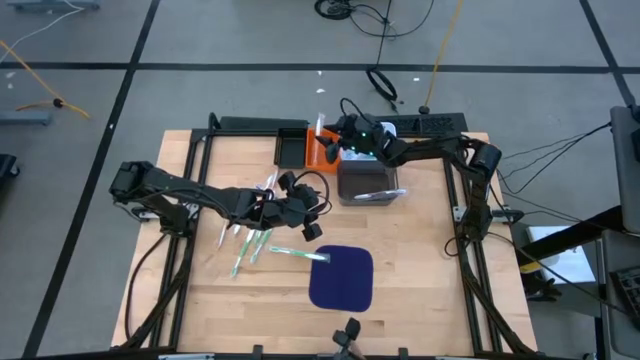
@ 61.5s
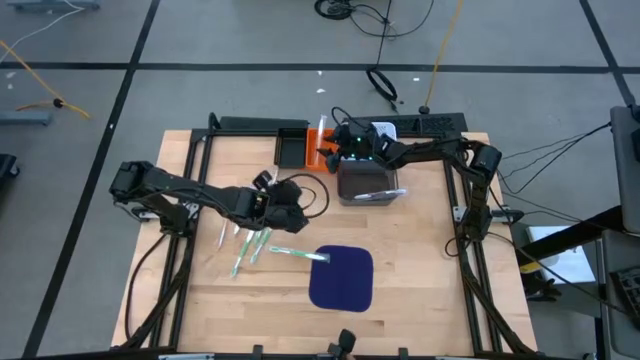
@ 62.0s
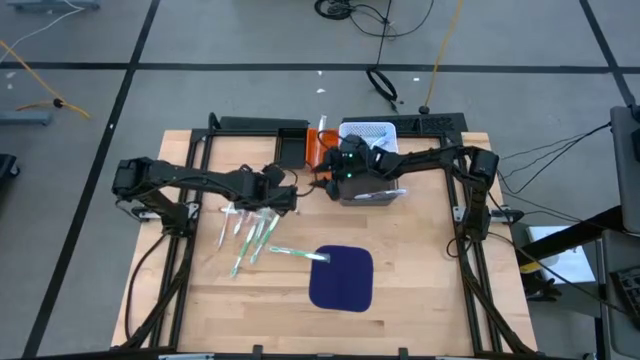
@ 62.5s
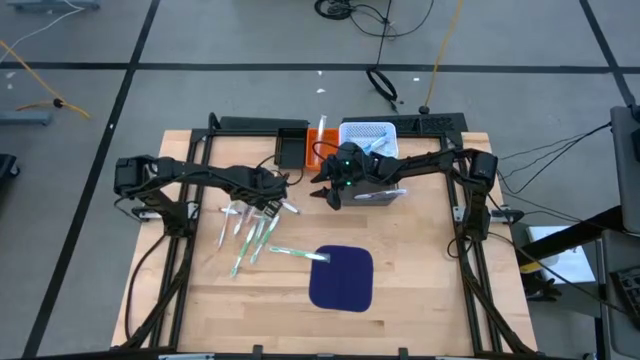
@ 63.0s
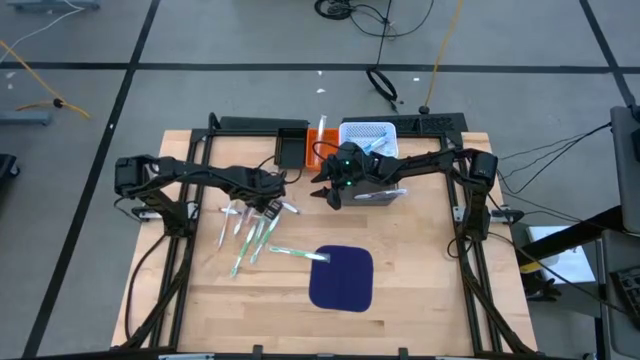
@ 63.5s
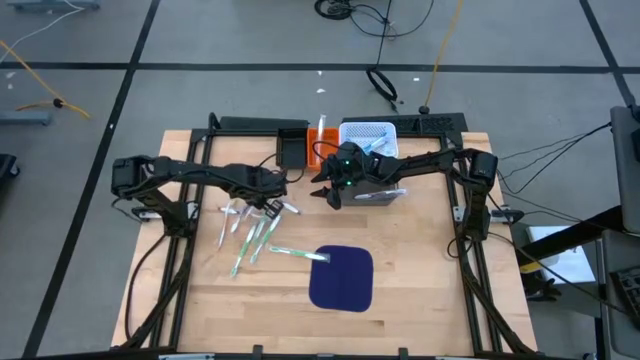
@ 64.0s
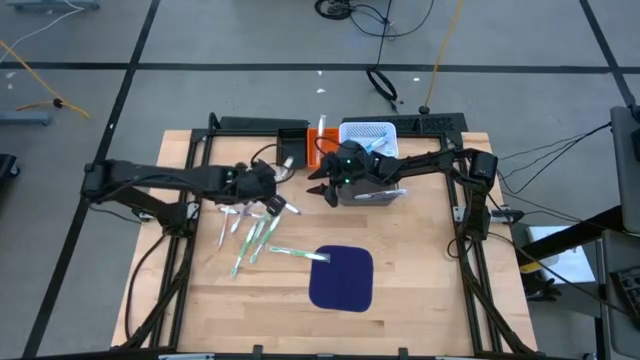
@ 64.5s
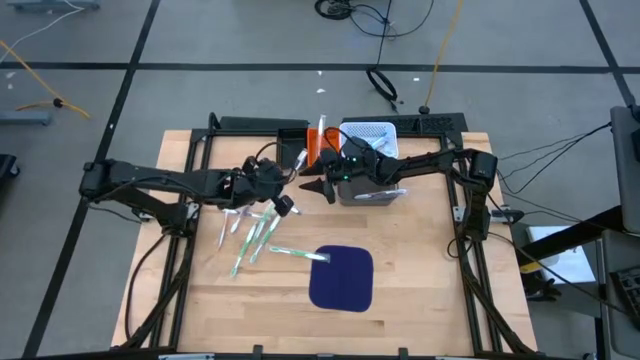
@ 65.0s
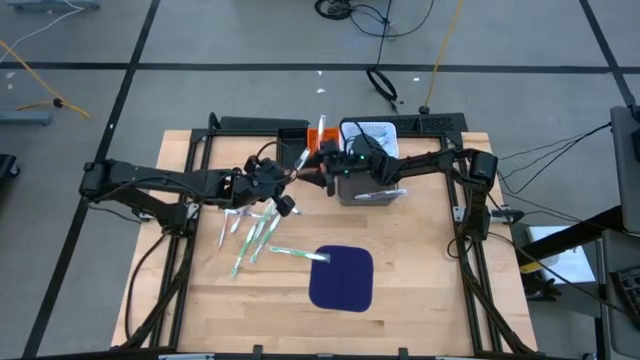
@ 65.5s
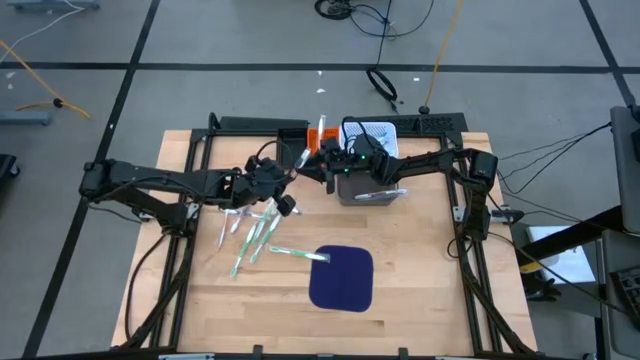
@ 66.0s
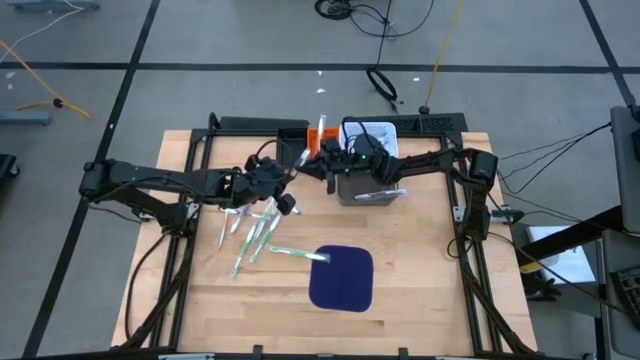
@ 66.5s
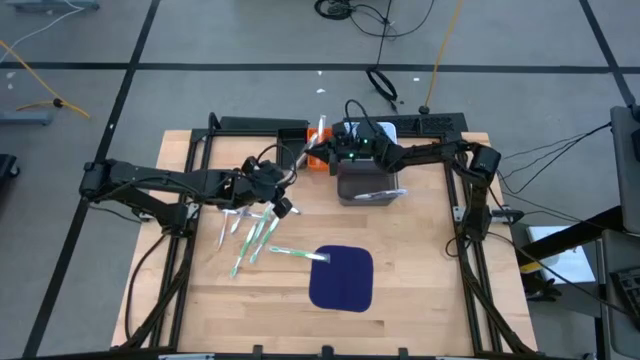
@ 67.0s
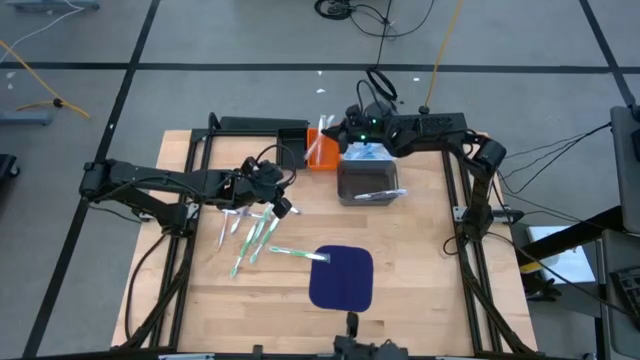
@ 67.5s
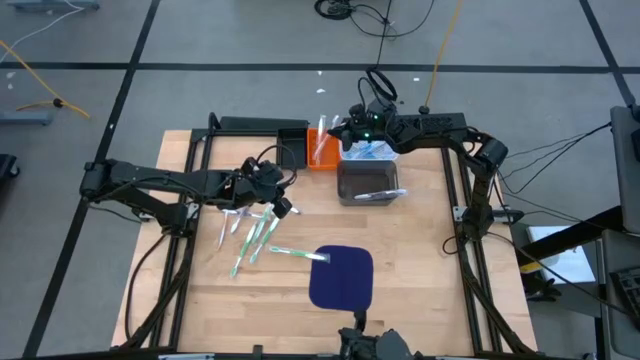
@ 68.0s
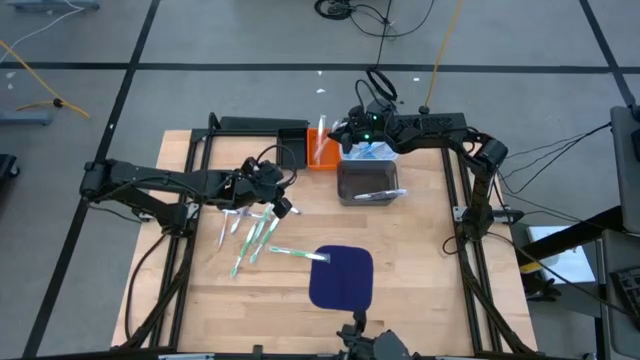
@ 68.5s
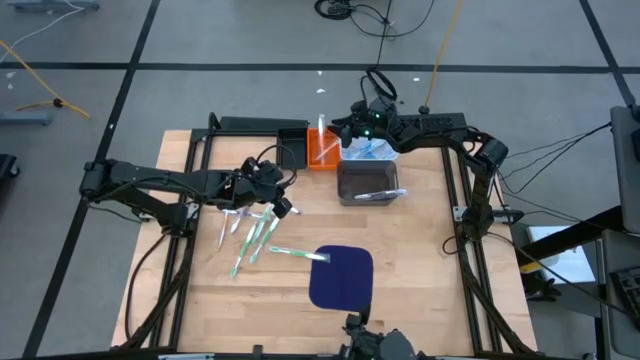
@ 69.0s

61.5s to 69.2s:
Task: Pick & Place Toothbrushes
Put the orange toothbrush into the orange basket

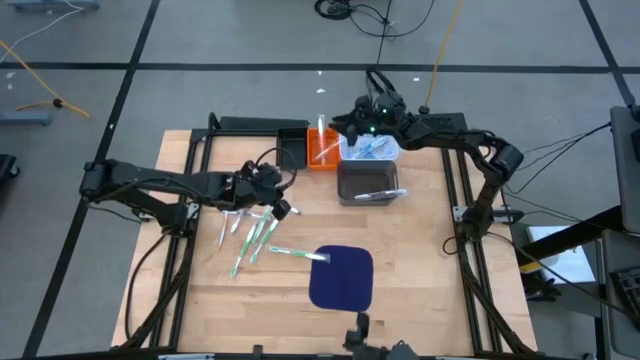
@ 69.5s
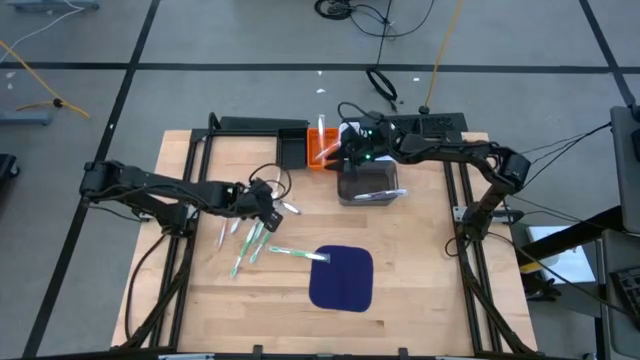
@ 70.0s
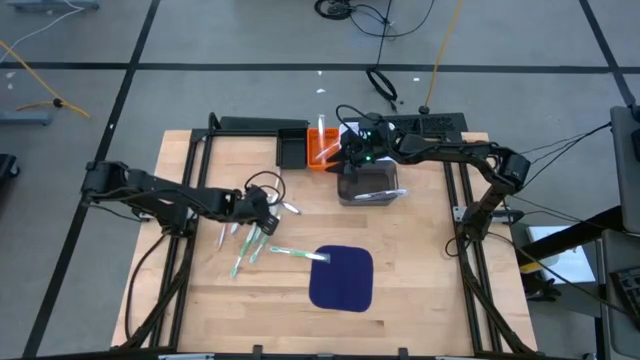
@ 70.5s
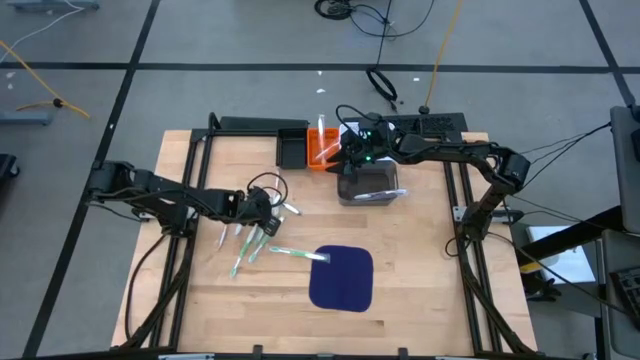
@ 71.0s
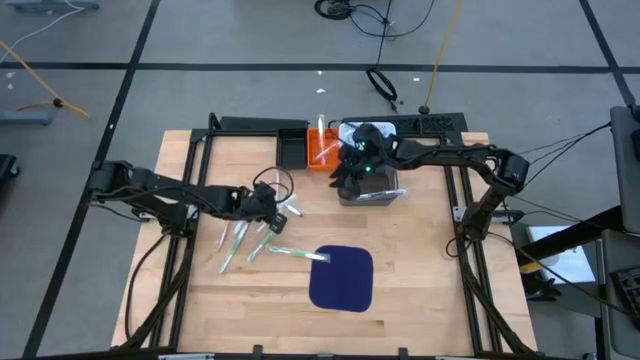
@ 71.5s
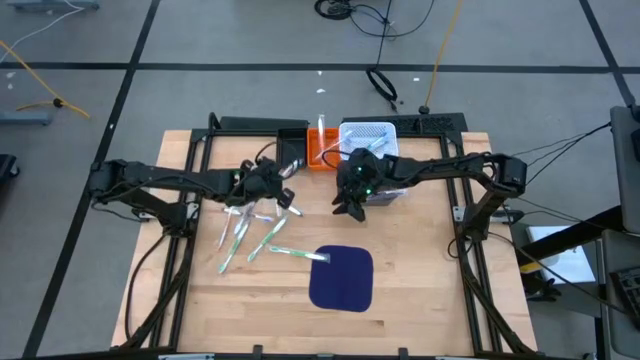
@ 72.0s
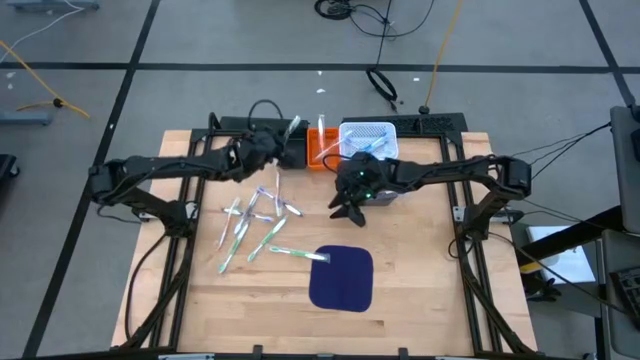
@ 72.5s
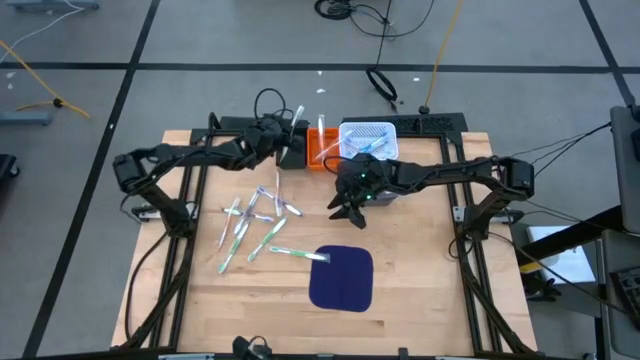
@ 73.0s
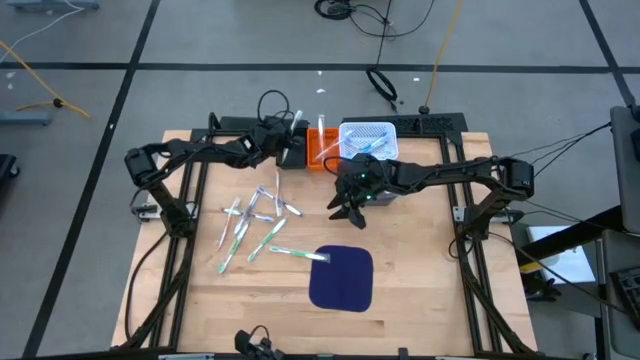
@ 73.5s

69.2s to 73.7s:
Put the green toothbrush into the black basket

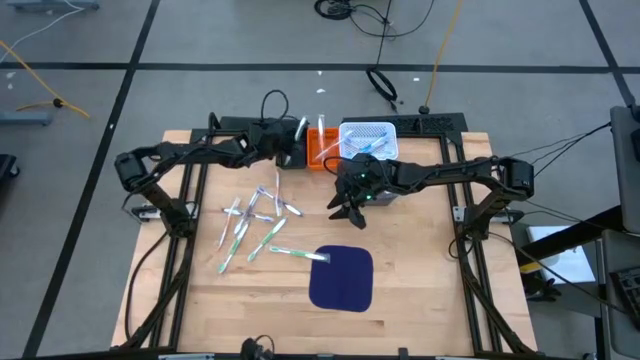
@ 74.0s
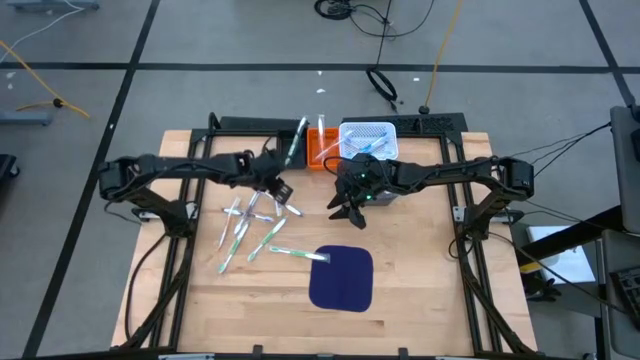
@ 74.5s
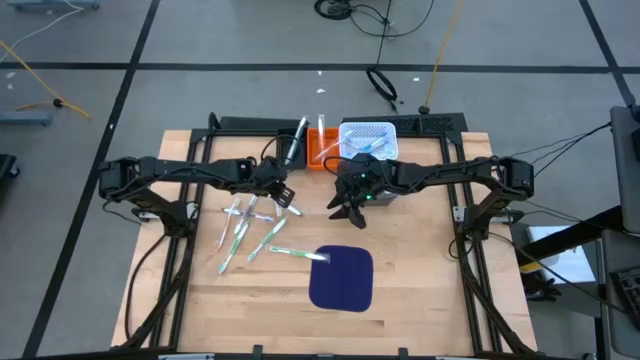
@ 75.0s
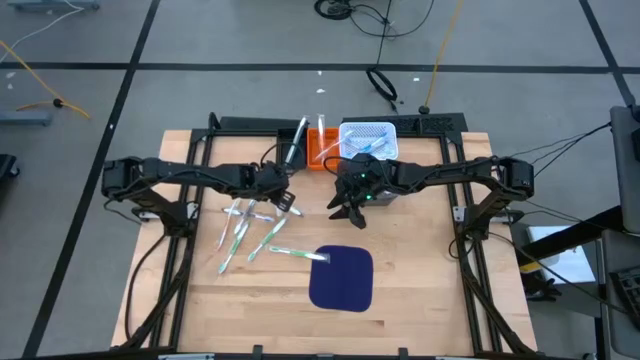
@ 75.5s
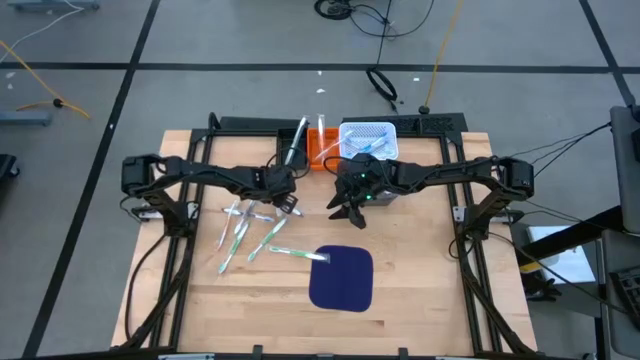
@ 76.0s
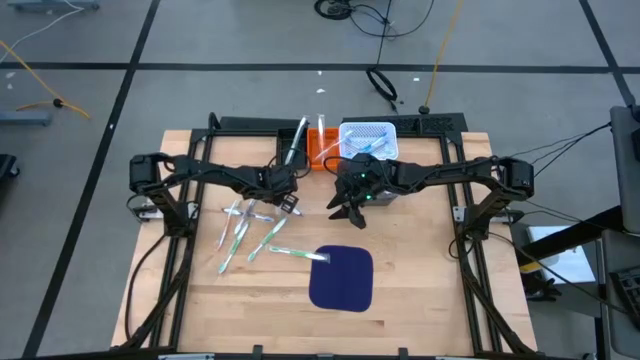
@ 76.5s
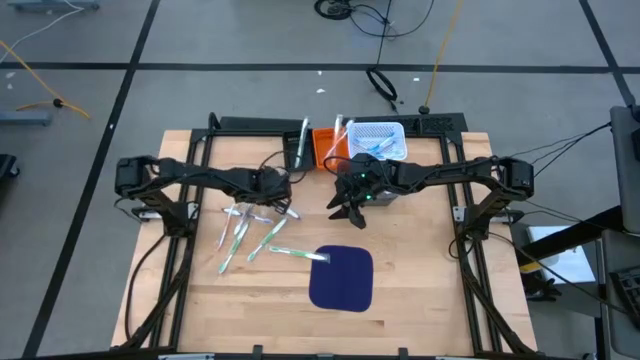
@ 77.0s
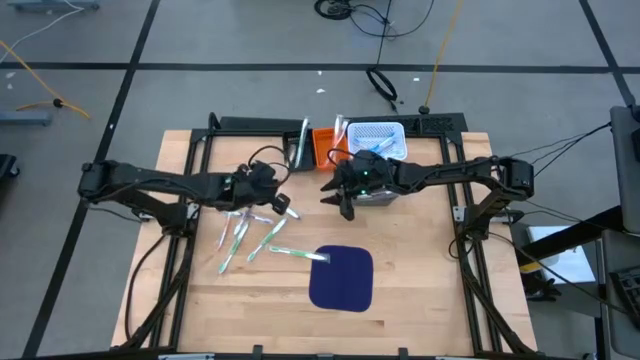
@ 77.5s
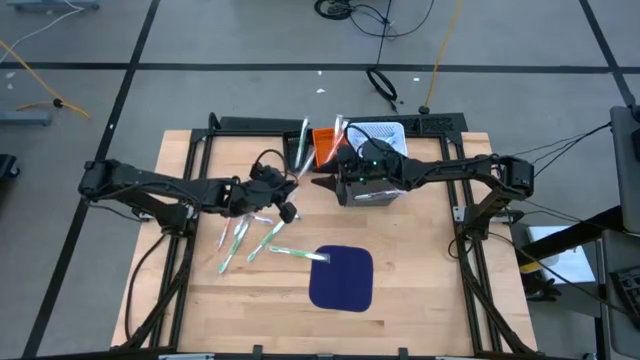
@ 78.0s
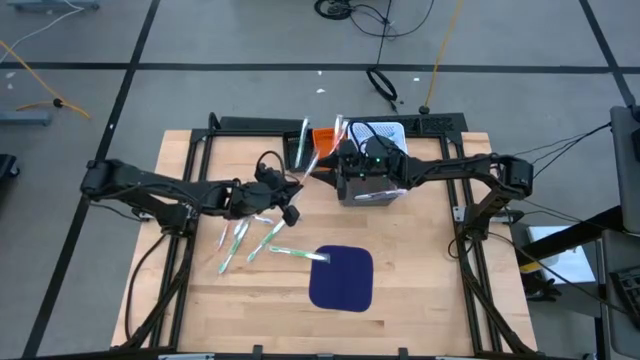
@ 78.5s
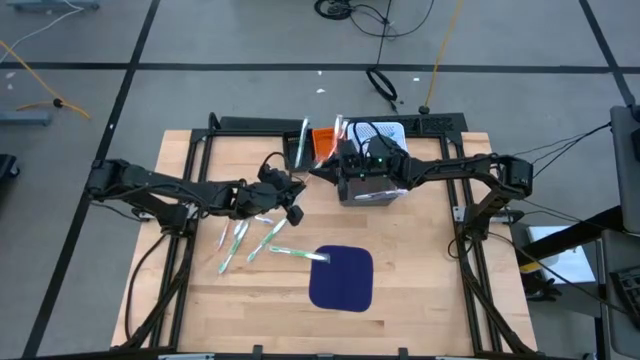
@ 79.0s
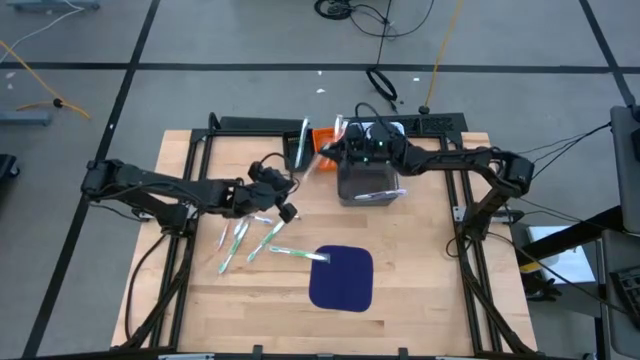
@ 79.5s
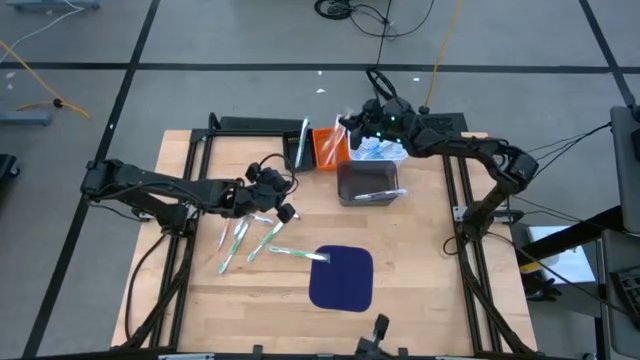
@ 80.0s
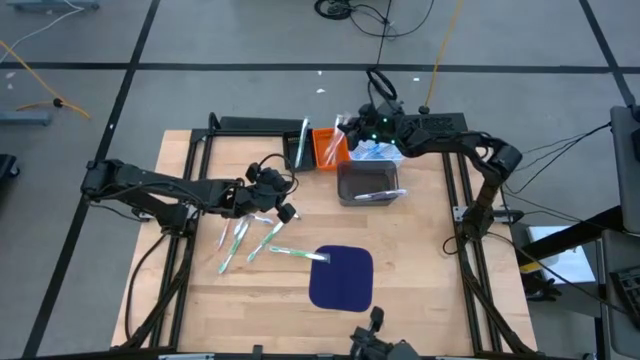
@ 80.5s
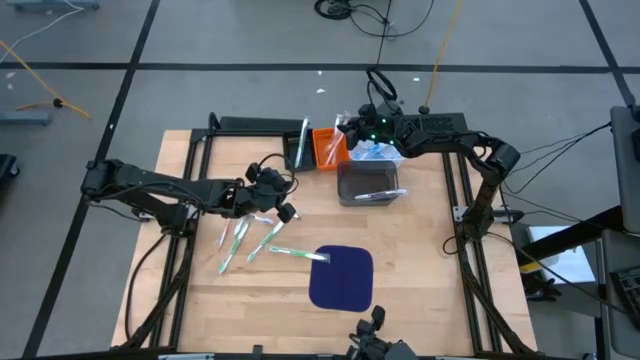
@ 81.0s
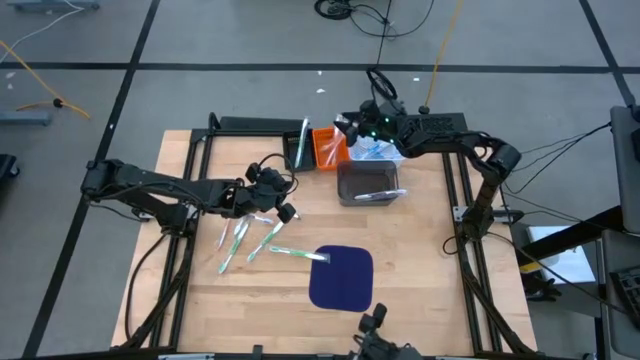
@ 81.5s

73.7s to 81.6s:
Put the orange toothbrush into the orange basket
